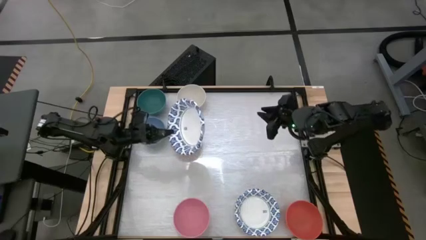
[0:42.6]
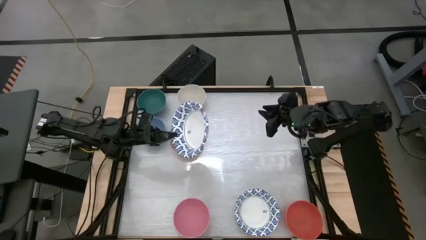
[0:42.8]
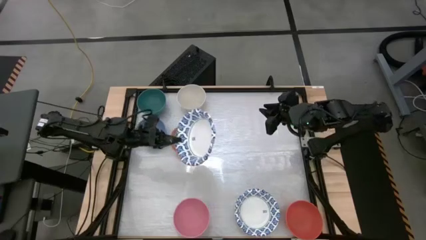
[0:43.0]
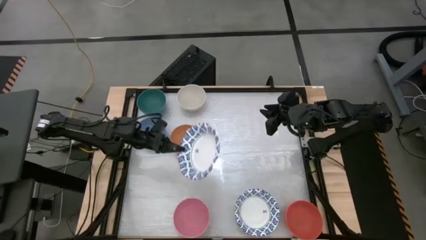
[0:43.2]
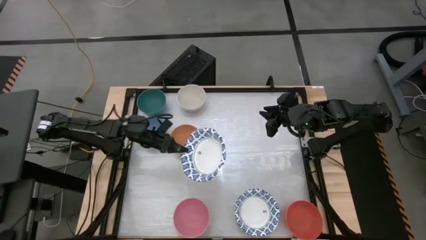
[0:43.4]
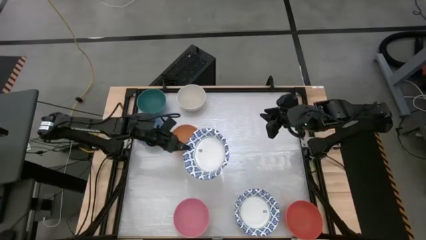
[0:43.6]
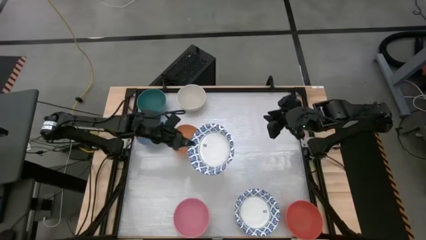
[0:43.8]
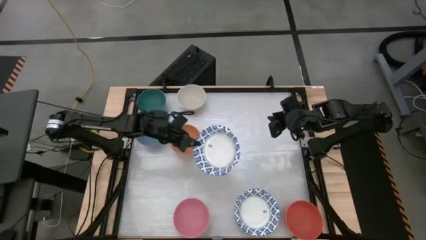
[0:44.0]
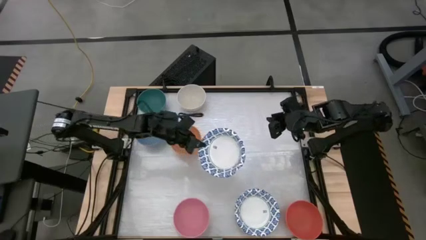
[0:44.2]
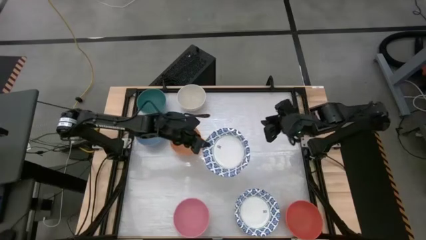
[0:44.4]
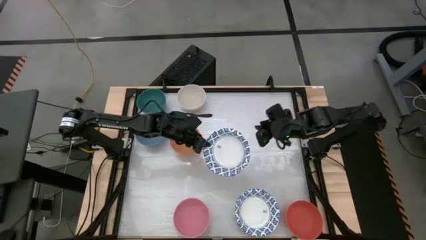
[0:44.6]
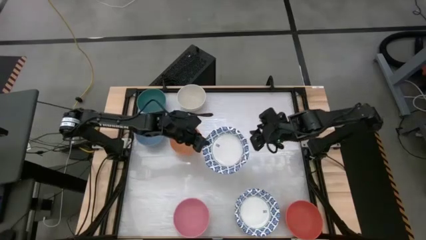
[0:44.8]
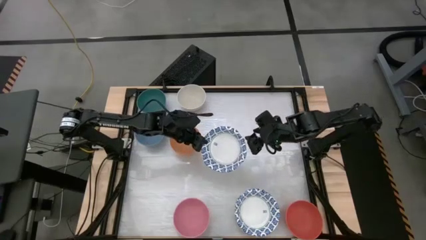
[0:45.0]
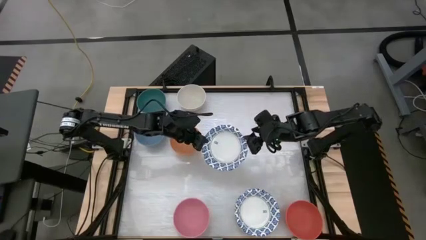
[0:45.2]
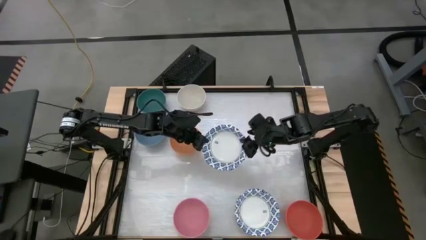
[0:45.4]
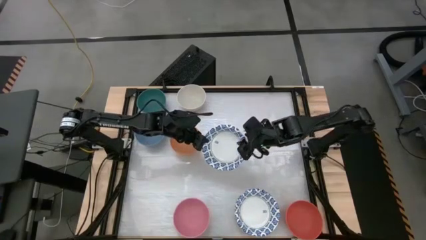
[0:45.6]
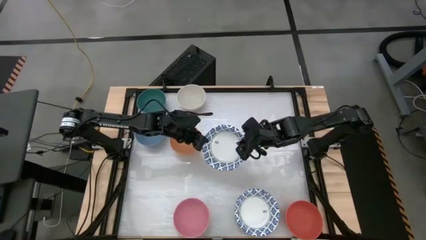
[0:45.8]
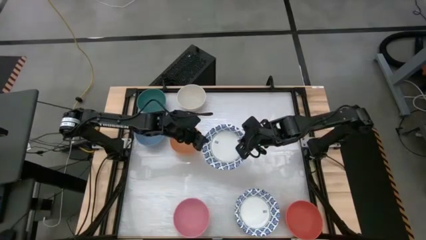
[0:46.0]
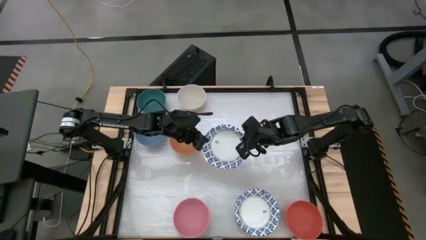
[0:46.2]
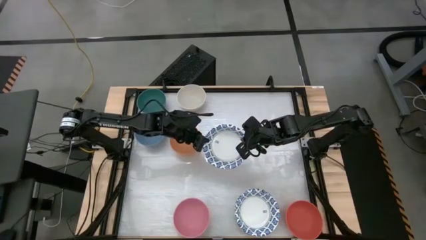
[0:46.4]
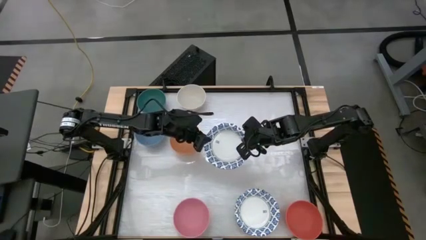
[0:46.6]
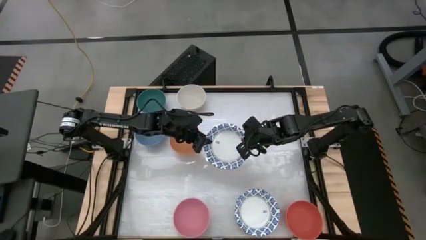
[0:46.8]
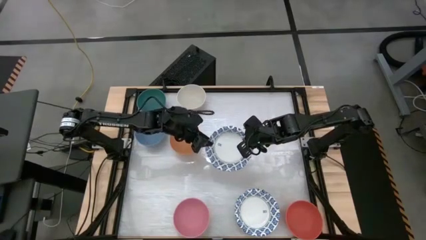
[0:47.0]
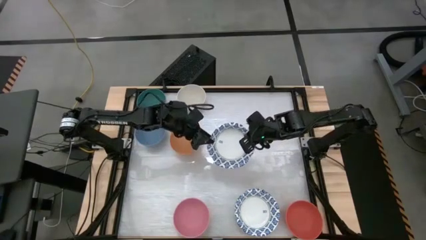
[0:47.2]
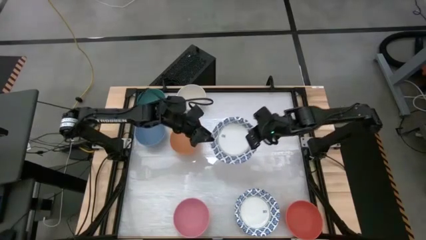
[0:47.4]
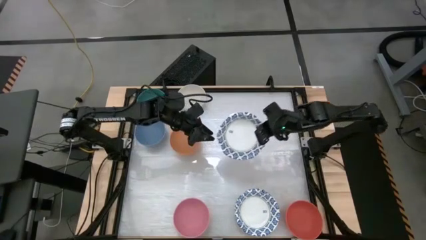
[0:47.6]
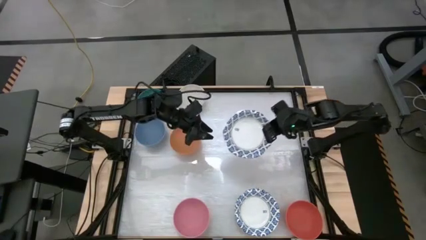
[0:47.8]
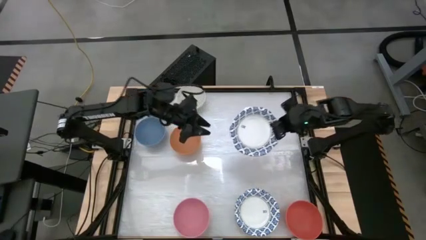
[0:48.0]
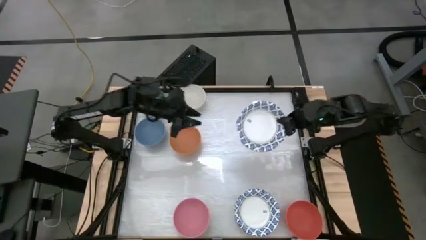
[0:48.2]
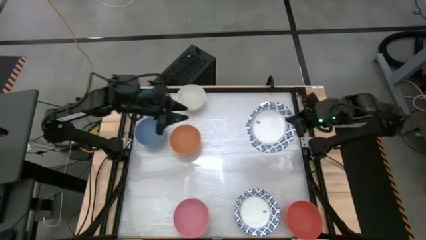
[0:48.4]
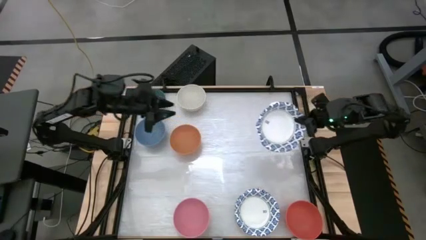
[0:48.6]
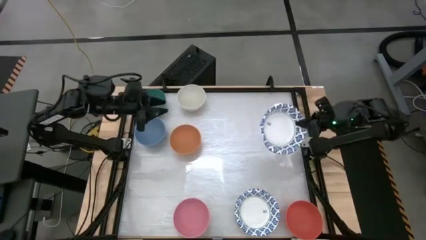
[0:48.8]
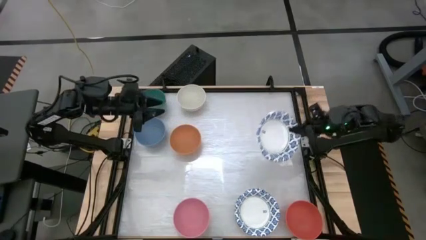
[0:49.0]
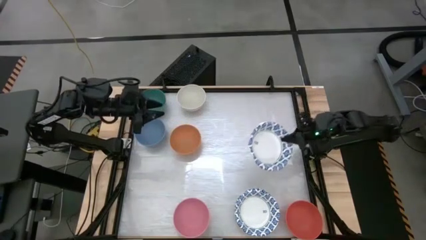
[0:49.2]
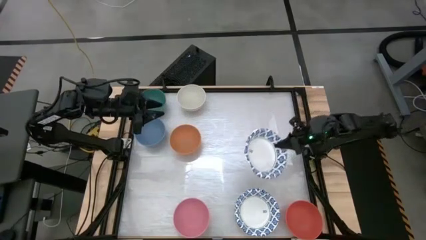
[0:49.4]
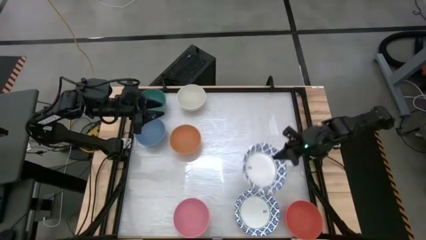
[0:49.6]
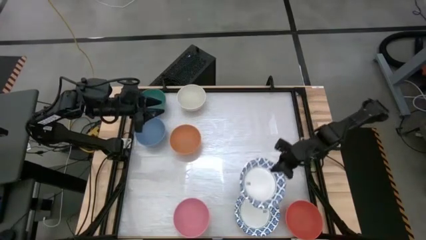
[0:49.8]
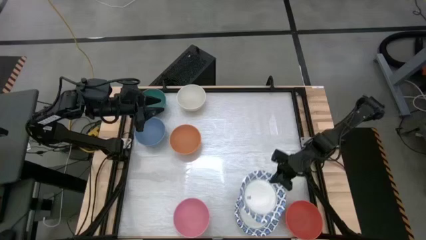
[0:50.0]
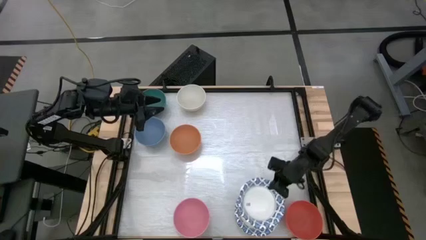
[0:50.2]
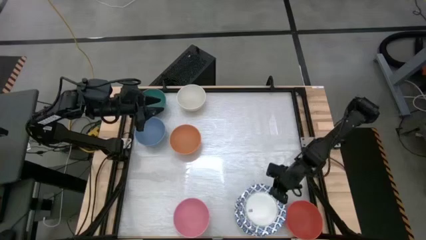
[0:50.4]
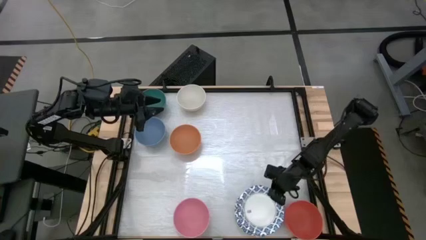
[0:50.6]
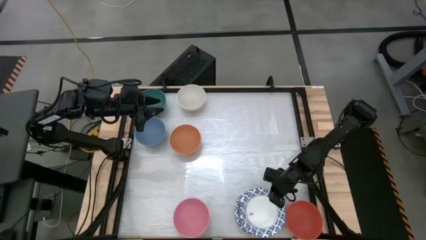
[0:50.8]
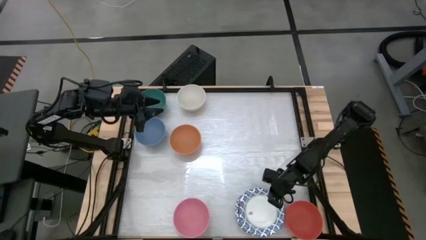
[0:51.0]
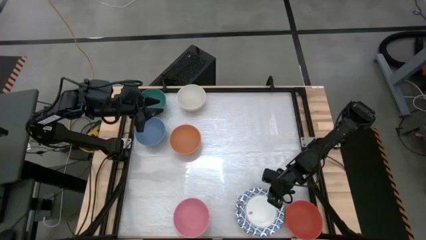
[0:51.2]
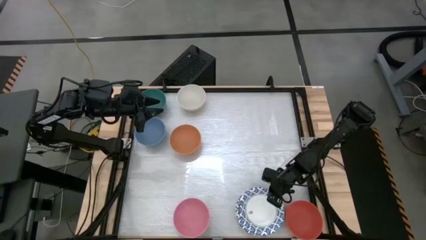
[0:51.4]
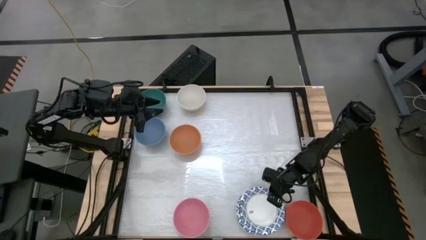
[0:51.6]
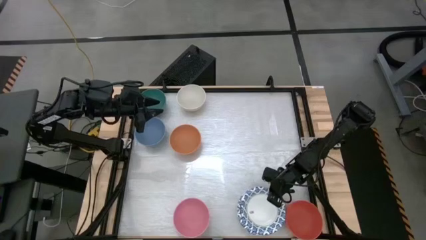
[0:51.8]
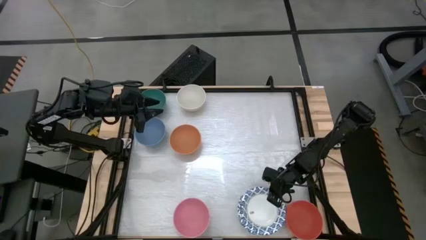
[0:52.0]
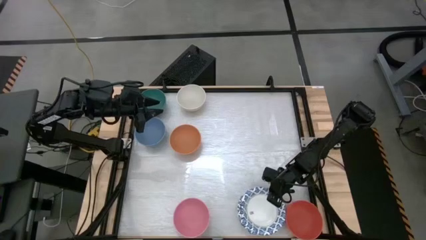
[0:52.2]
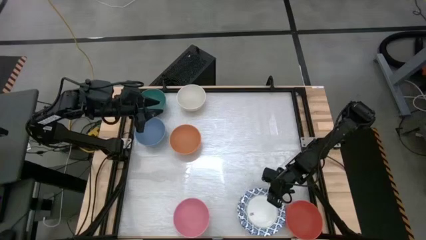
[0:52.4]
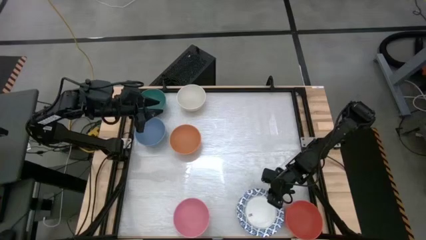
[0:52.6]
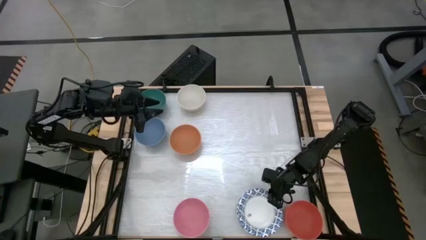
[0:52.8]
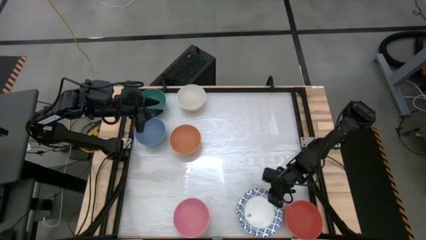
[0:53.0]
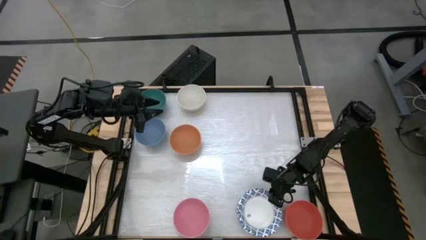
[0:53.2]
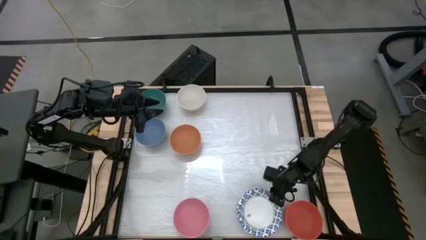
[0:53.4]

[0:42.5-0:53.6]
Stack the left white paper bowl on top of the right white paper bowl

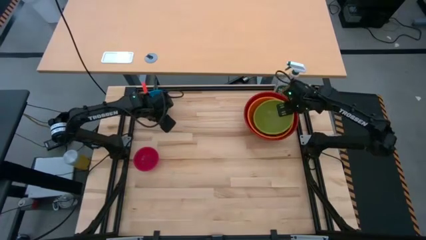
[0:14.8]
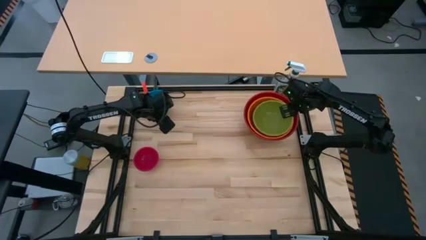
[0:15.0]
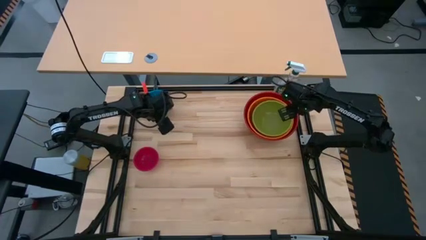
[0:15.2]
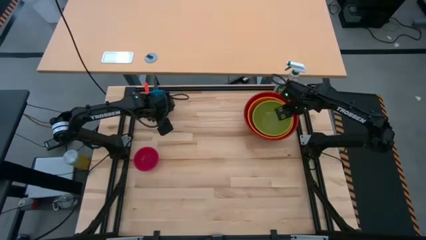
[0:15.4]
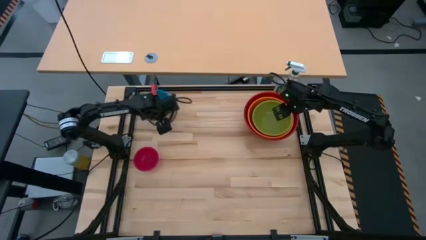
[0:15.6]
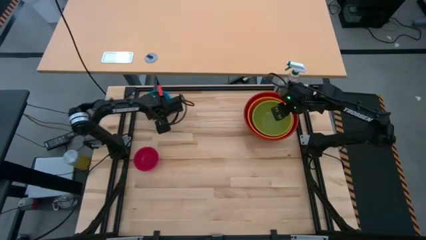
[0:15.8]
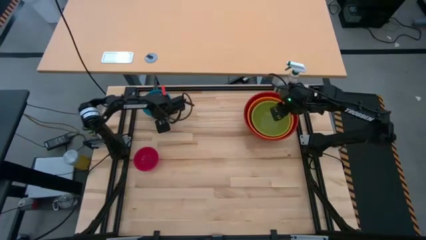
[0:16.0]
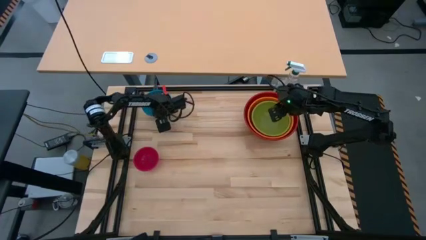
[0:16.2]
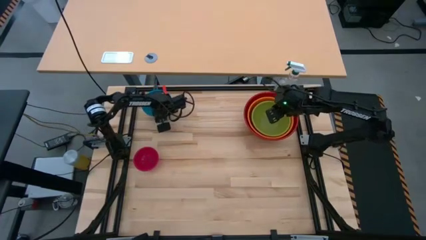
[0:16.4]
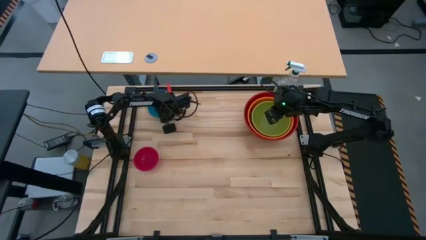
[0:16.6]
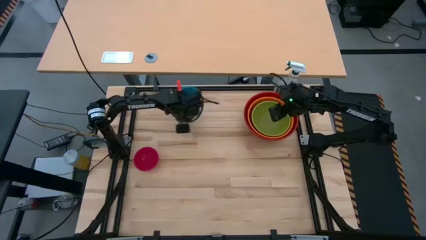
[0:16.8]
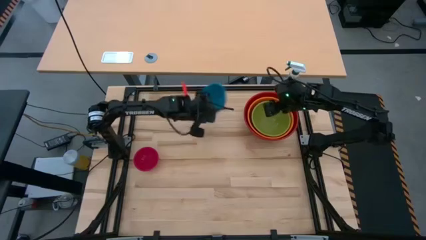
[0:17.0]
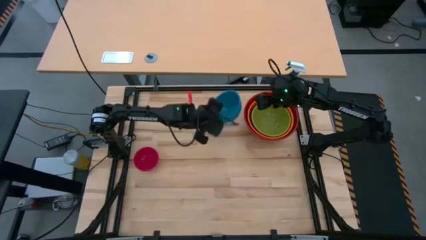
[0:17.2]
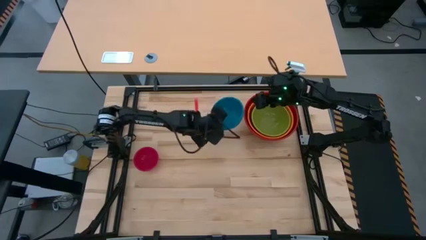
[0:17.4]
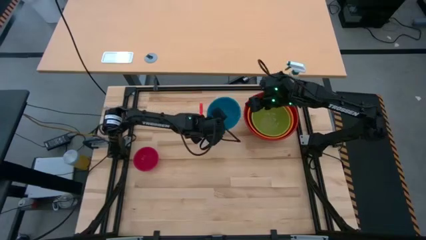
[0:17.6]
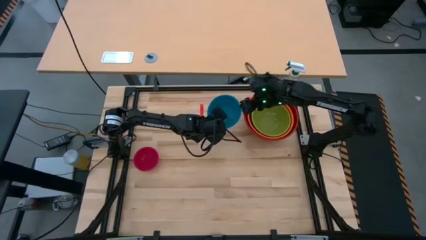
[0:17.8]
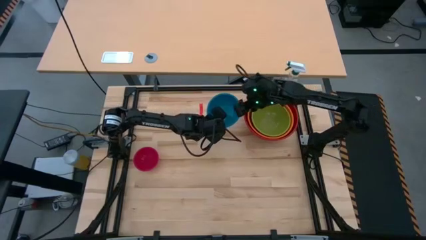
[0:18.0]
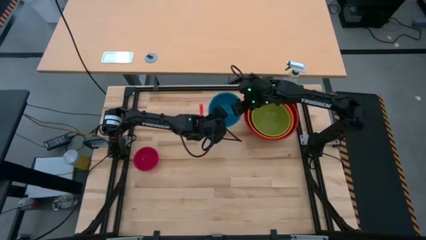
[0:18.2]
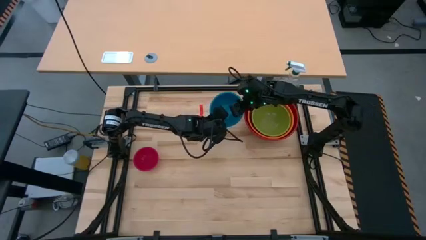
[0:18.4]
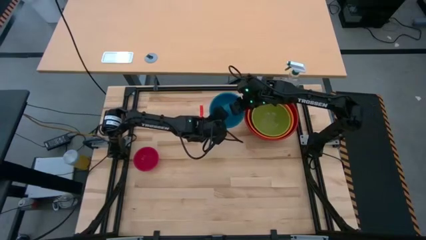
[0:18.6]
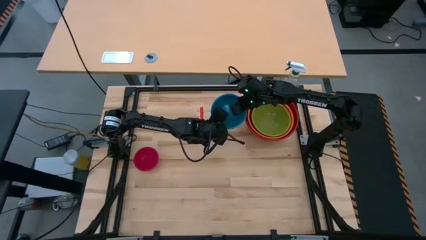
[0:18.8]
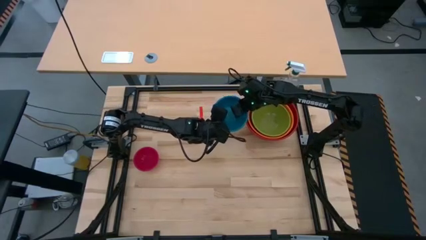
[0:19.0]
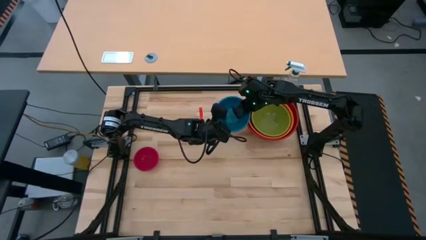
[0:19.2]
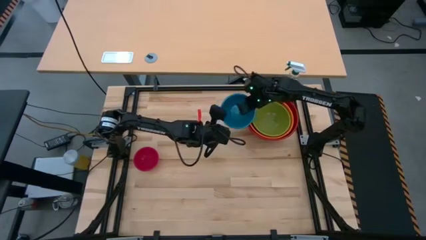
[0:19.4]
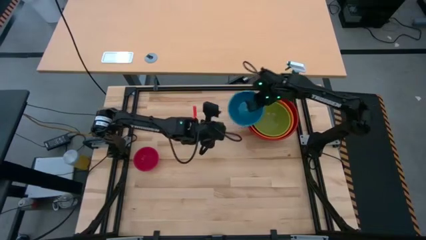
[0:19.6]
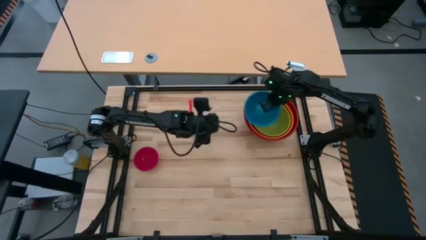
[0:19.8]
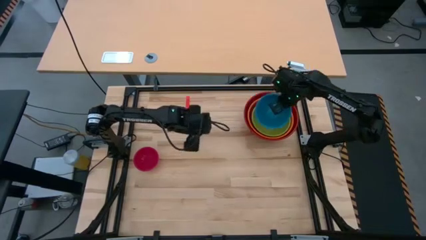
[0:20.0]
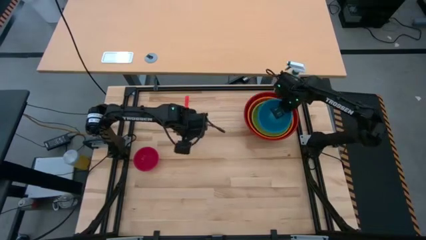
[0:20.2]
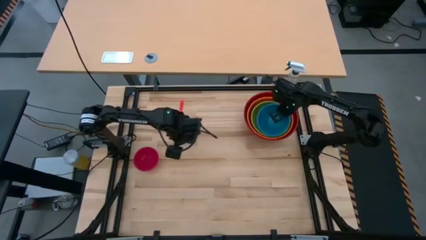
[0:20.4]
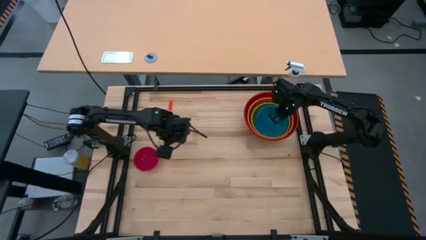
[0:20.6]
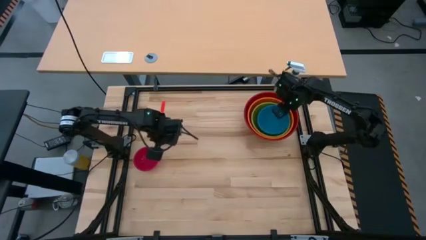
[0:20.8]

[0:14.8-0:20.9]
Stack the blue bowl on the green bowl
